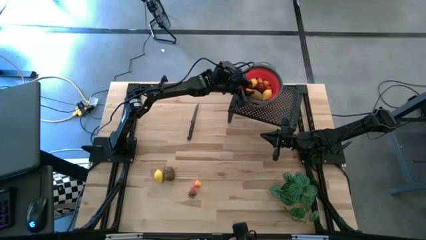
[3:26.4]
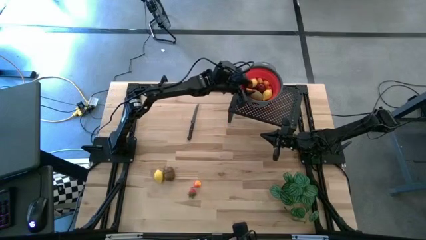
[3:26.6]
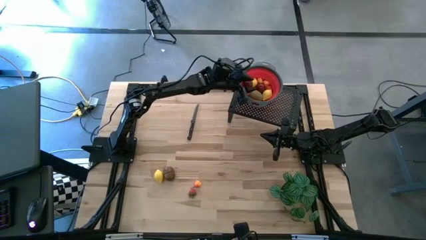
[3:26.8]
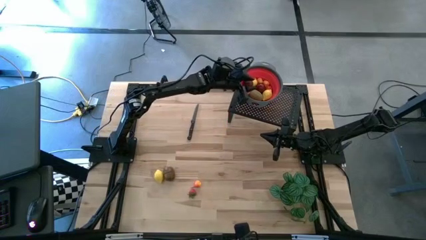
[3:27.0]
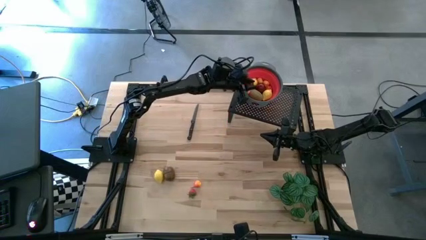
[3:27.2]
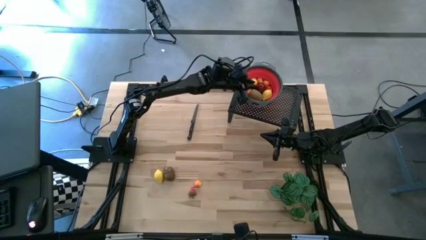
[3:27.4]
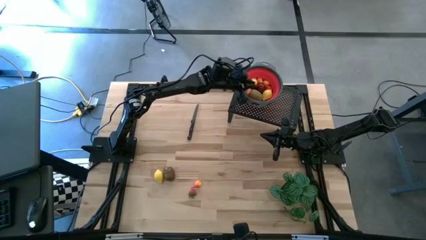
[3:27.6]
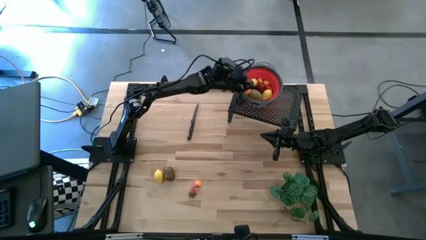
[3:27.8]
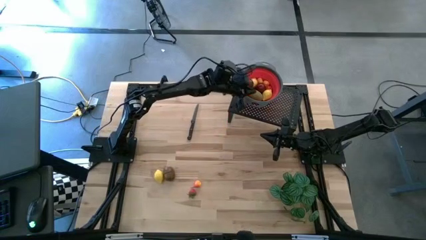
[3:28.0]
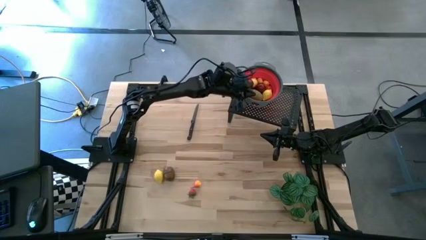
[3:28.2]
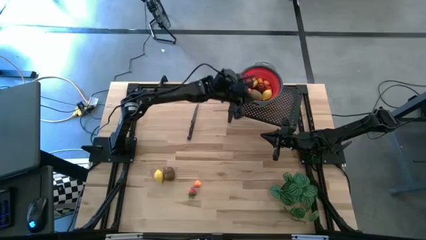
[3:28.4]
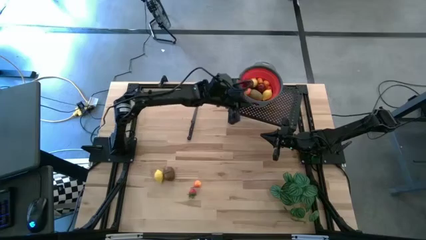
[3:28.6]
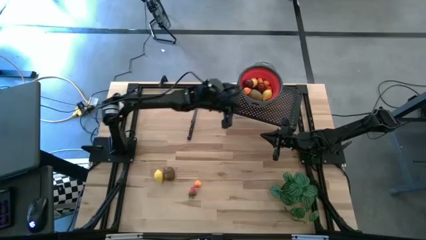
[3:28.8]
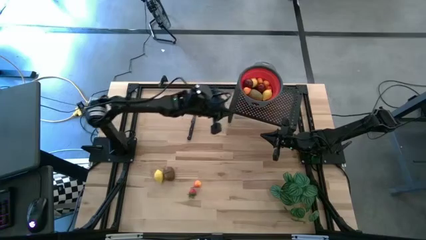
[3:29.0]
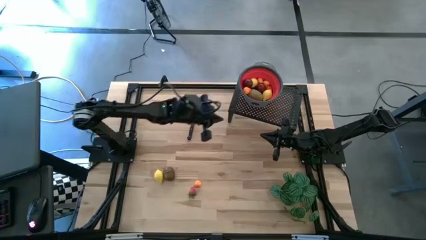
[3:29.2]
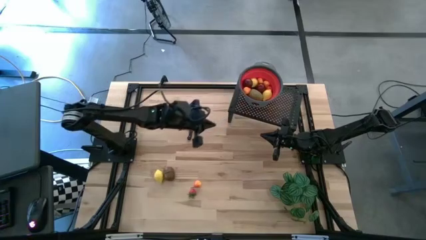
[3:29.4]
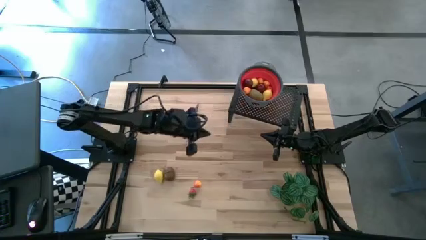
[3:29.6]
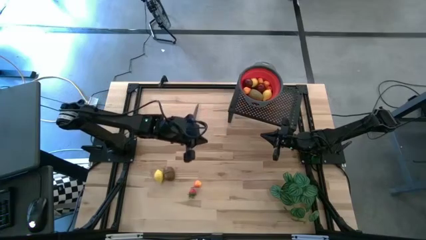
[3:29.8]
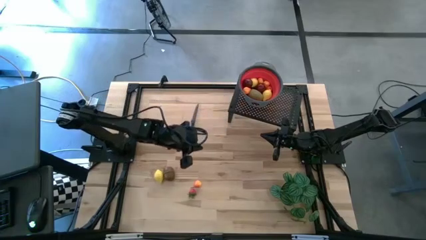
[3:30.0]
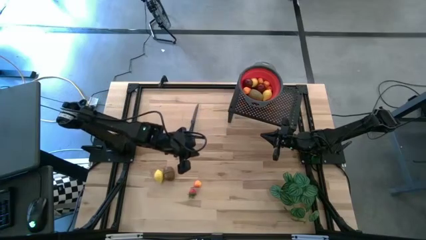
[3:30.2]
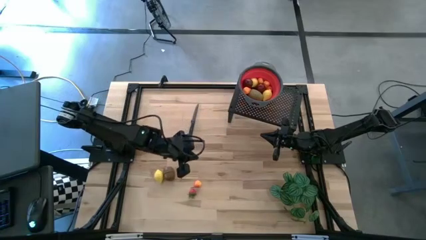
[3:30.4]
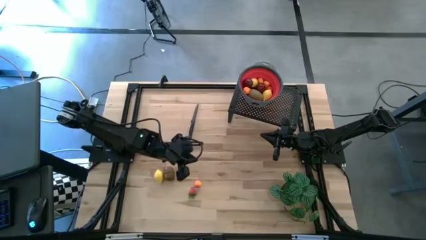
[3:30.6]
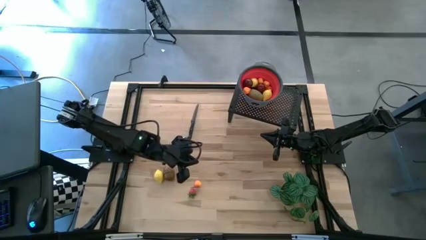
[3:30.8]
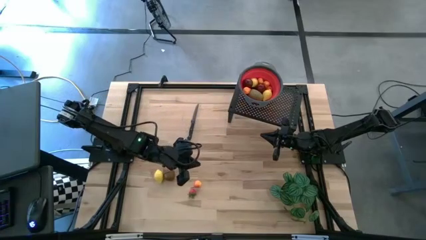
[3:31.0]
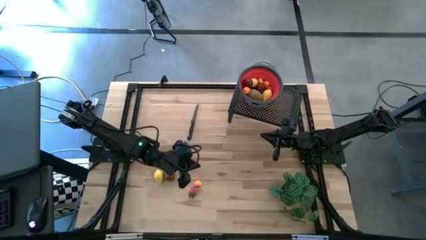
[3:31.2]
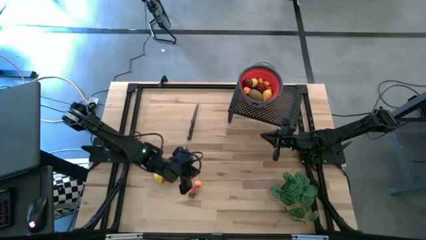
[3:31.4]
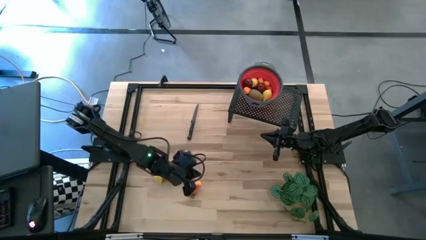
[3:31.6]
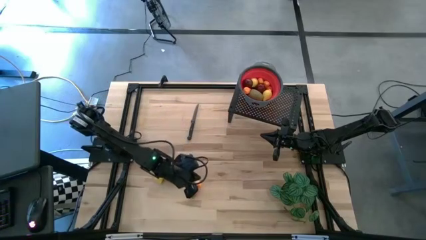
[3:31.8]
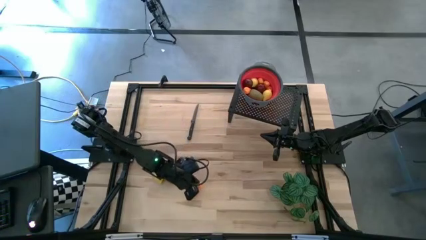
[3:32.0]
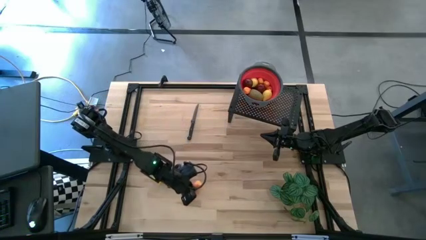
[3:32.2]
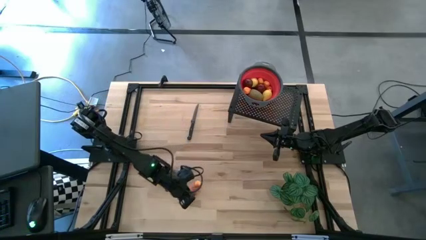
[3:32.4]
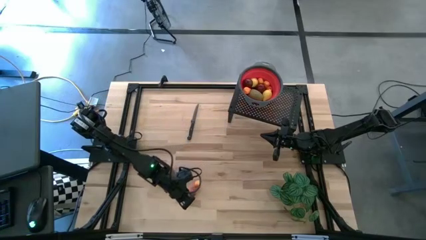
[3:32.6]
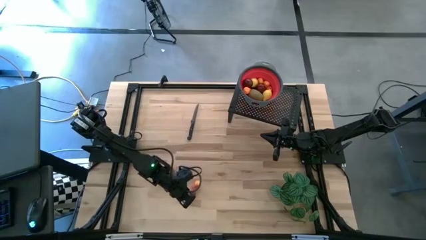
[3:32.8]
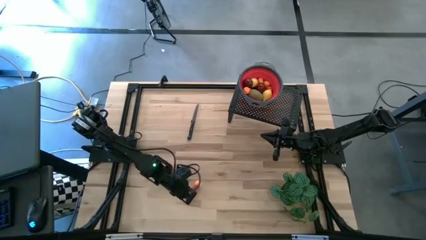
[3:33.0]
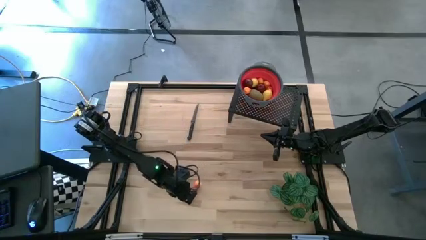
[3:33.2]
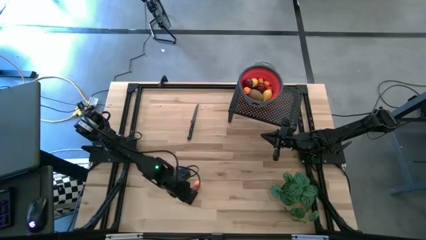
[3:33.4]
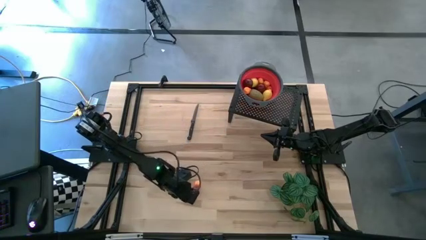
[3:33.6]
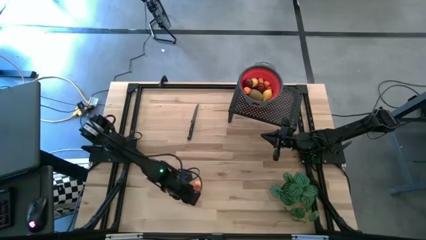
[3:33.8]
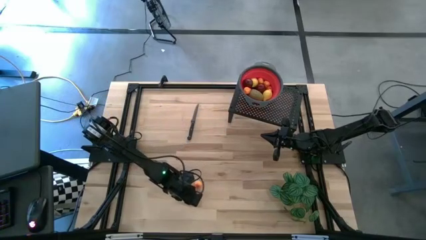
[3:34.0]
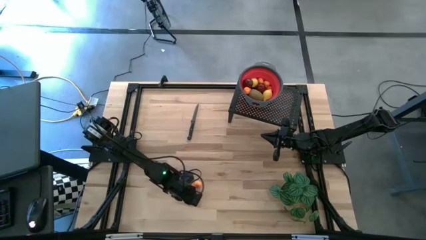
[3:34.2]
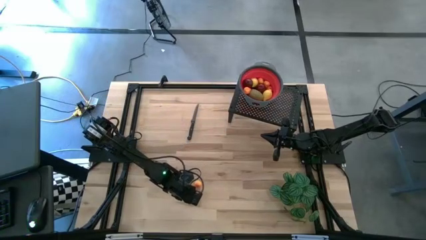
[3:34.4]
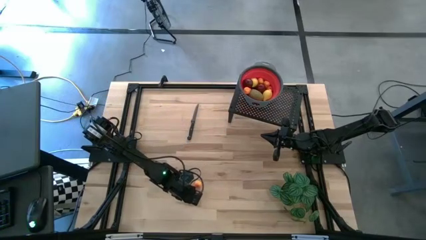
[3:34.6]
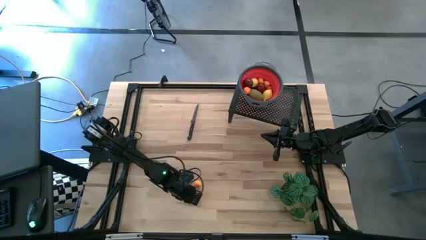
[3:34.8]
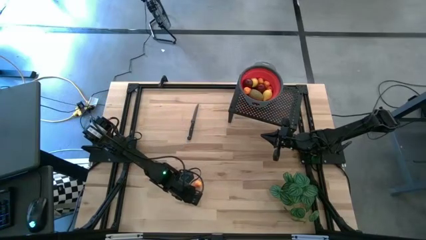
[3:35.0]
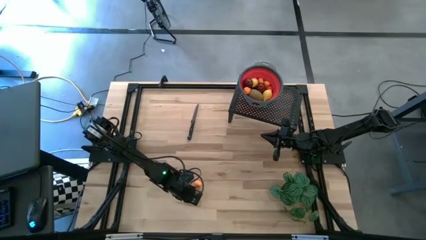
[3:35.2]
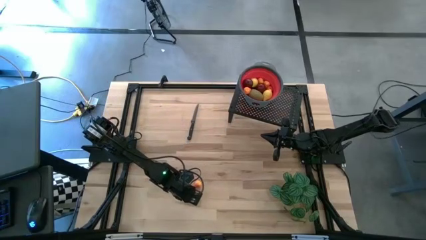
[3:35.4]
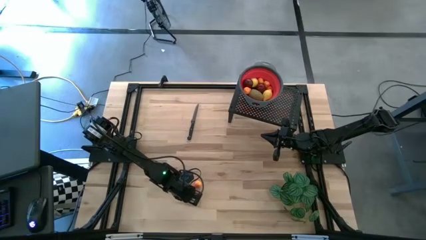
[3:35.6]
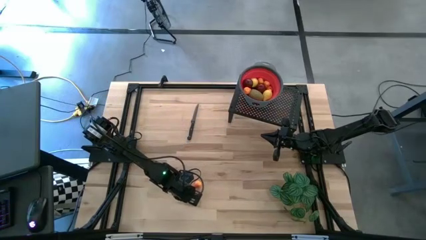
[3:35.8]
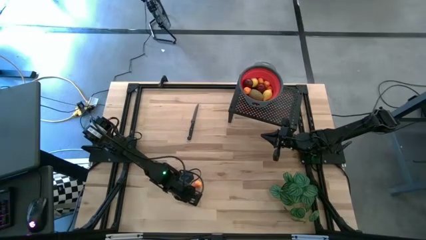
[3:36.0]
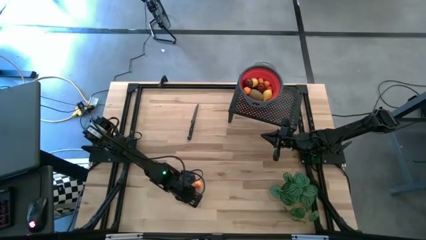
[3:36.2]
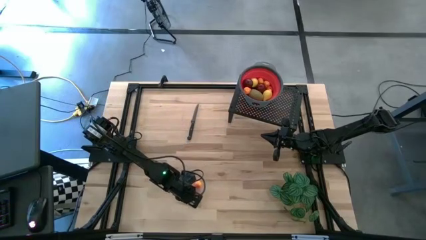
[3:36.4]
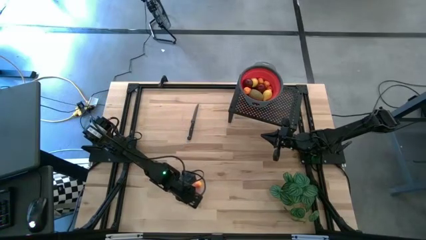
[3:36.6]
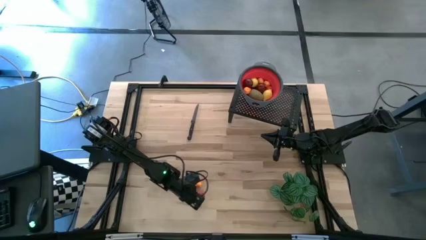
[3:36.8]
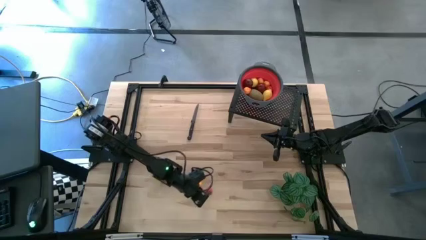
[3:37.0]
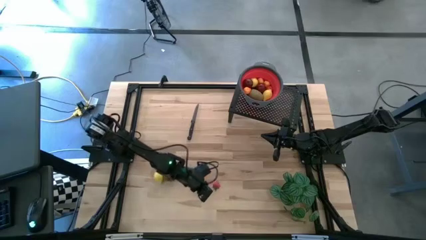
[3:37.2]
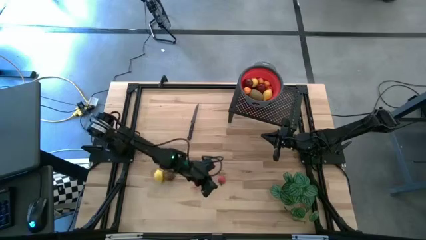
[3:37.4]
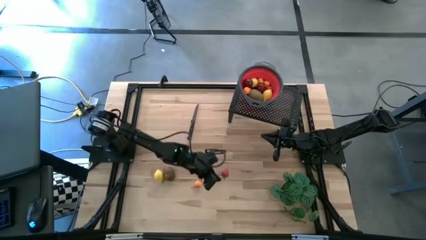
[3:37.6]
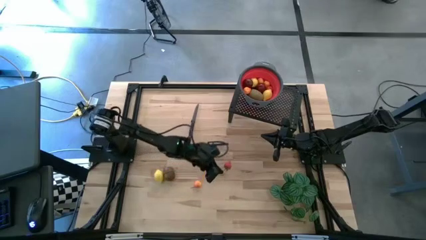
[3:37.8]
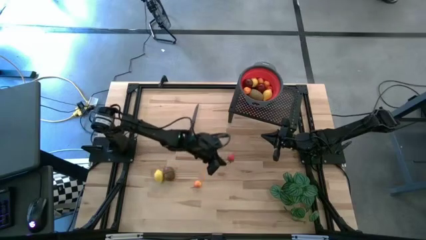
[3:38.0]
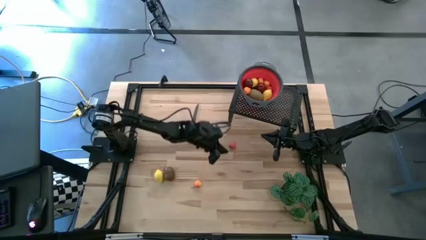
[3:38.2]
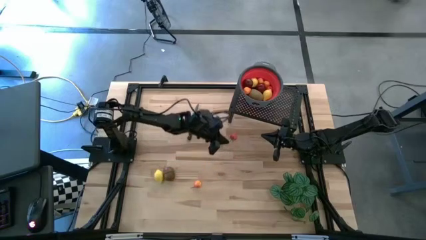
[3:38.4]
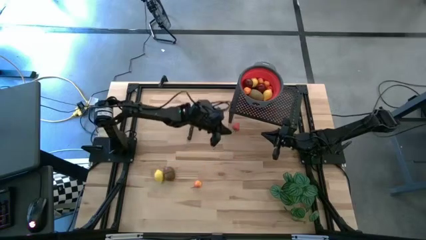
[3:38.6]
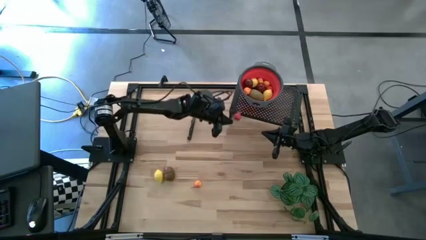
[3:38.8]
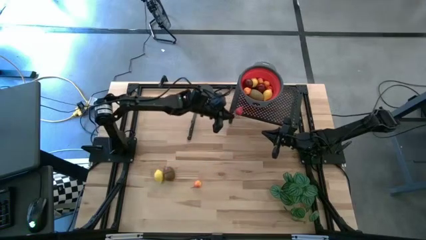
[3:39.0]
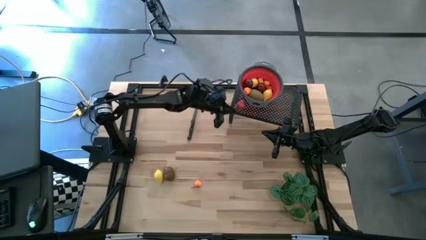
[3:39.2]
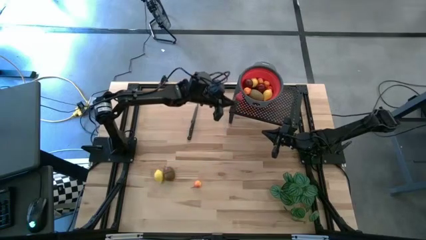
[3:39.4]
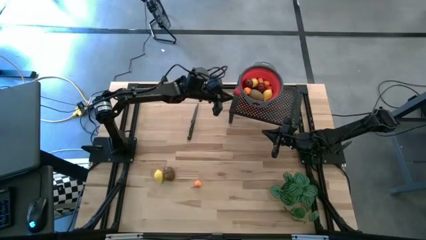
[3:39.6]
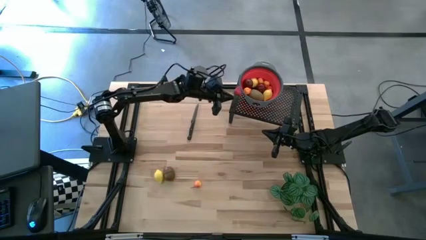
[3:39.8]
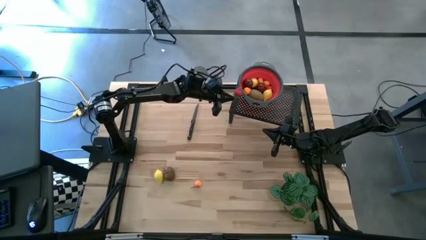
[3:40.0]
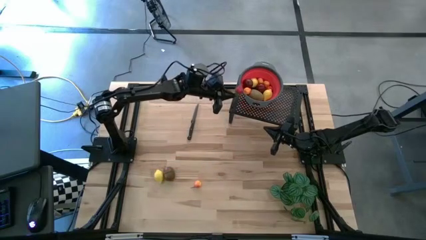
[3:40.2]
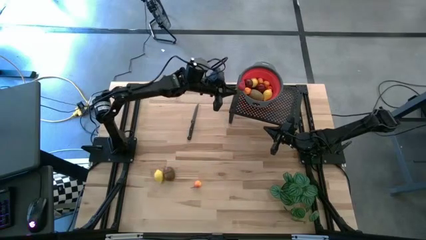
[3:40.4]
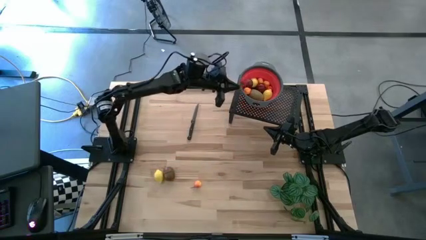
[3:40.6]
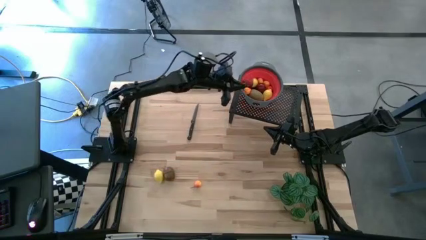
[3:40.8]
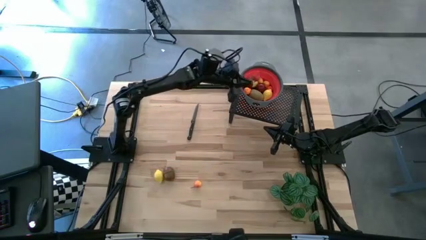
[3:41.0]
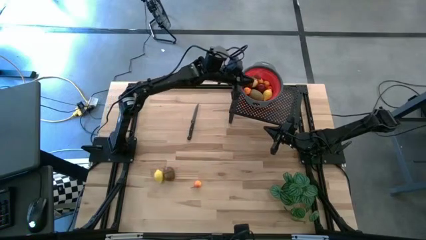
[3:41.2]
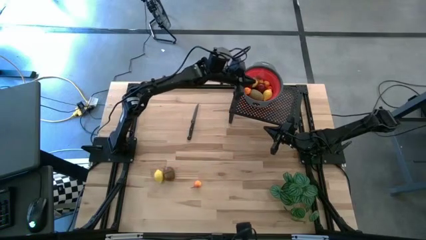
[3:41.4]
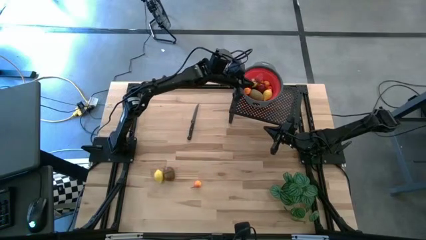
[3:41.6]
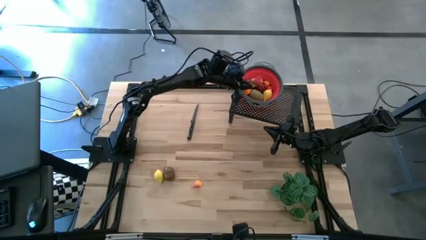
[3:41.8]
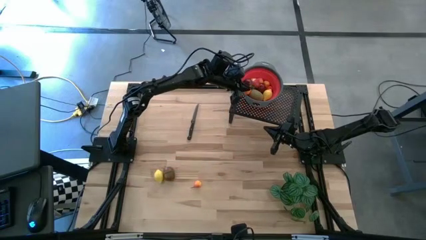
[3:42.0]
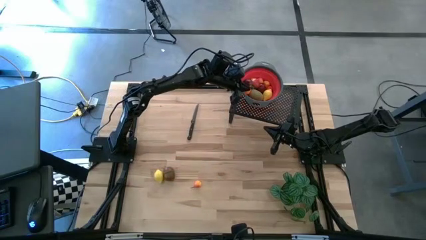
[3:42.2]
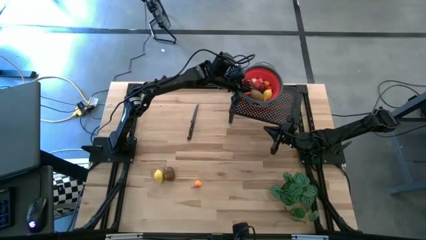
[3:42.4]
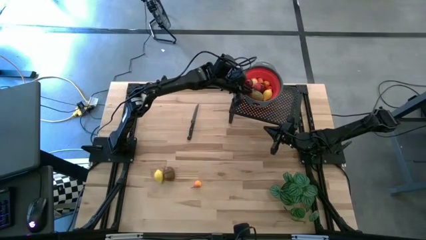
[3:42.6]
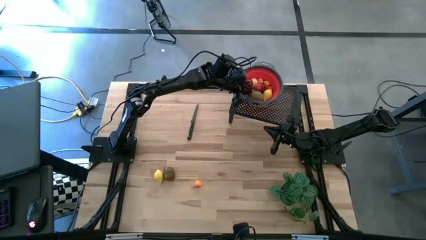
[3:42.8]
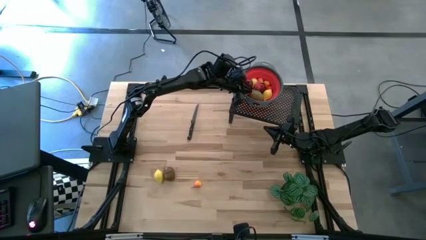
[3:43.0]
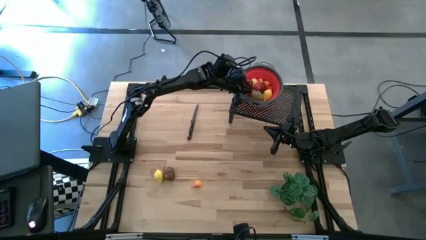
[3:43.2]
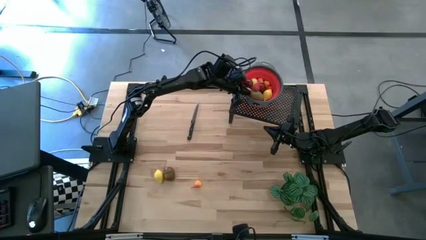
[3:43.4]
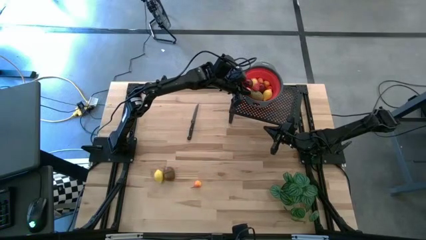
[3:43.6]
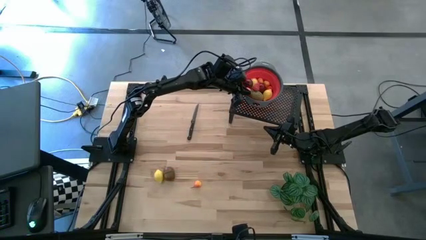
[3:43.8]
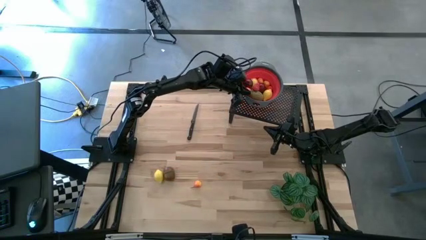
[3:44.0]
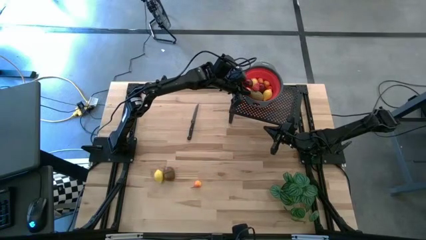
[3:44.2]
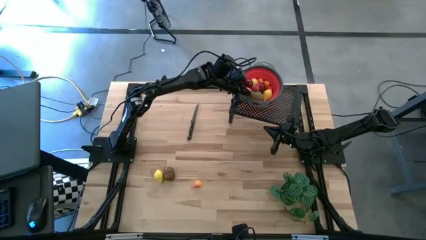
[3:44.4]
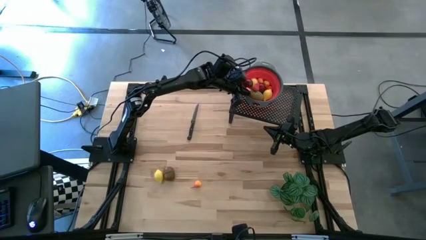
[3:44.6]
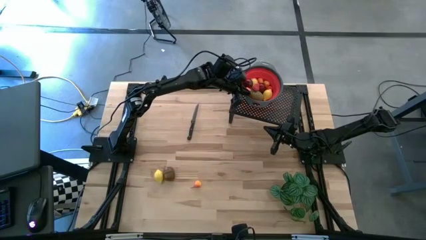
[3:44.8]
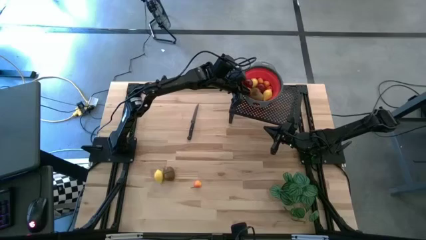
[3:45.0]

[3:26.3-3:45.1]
Task: Pick & Place Fruit
Put the red strawberry into the red strainer bowl on the shelf
